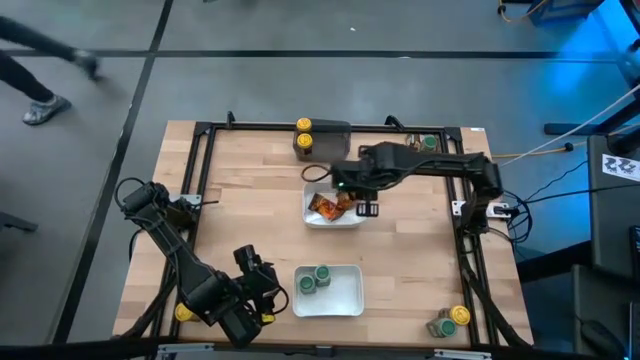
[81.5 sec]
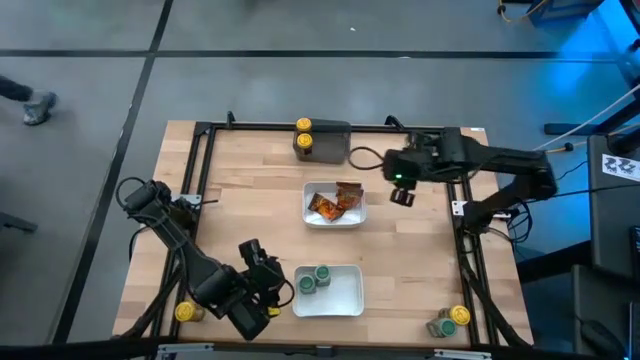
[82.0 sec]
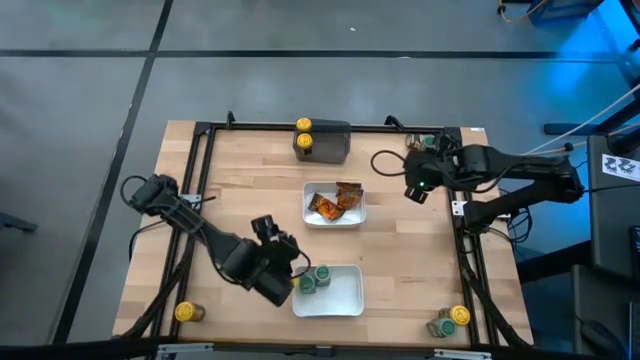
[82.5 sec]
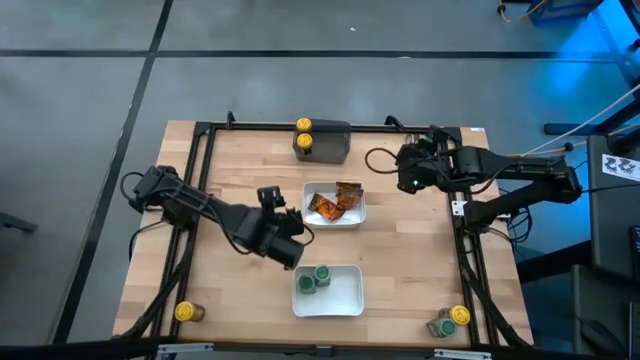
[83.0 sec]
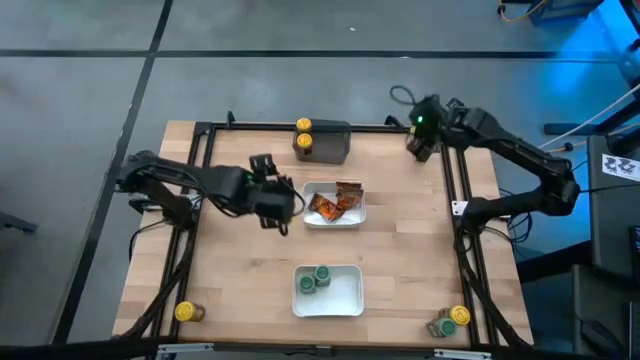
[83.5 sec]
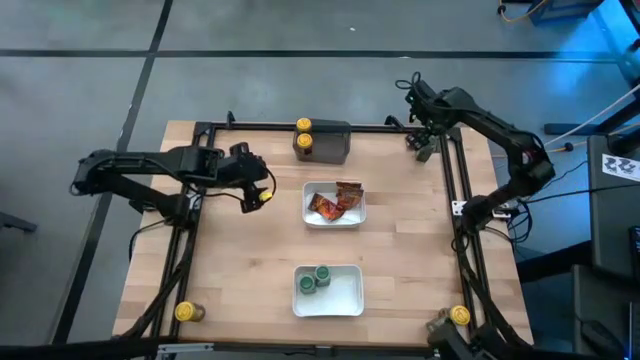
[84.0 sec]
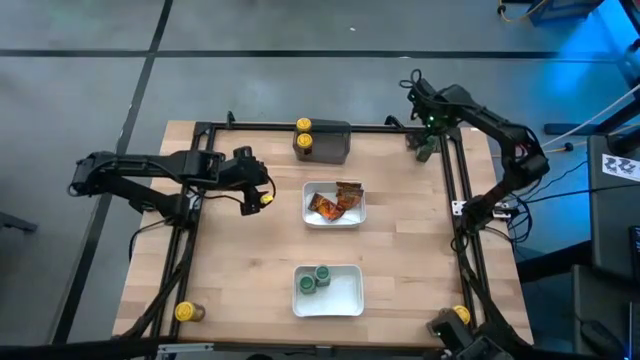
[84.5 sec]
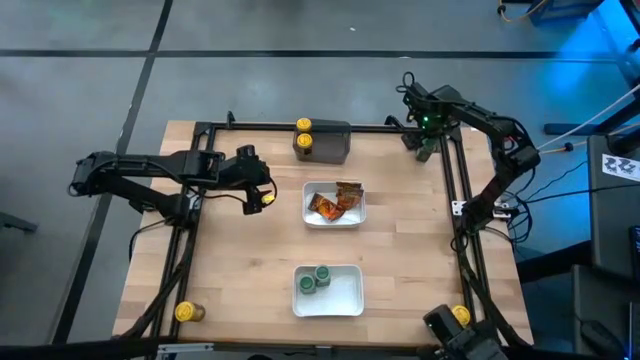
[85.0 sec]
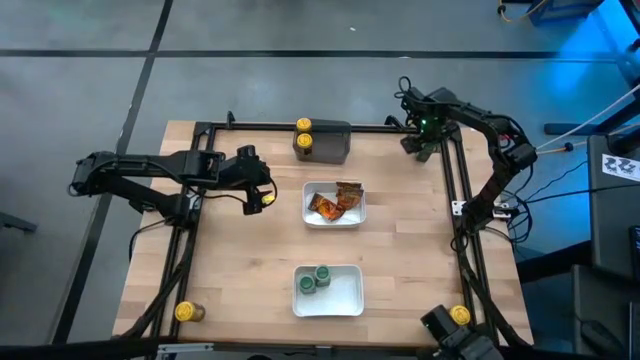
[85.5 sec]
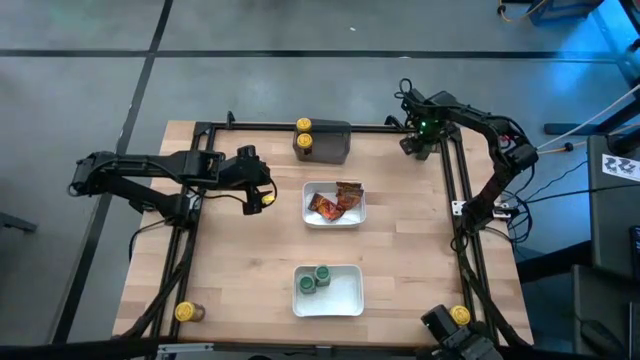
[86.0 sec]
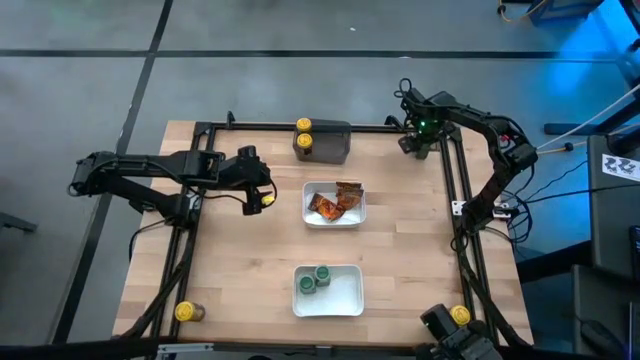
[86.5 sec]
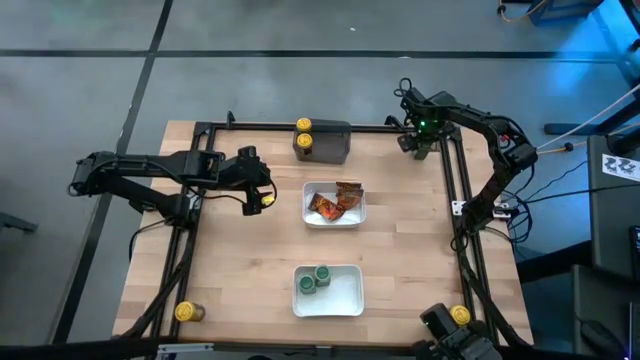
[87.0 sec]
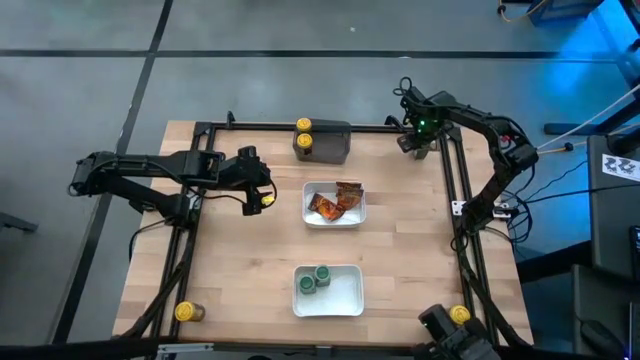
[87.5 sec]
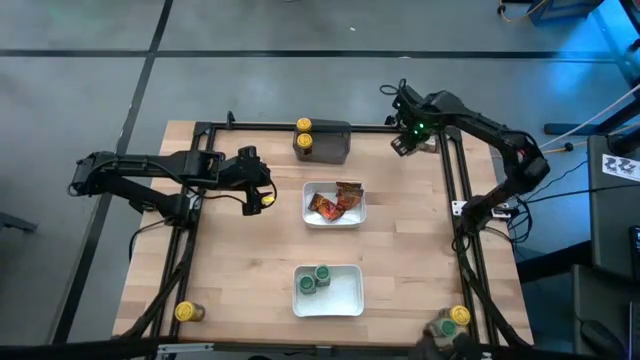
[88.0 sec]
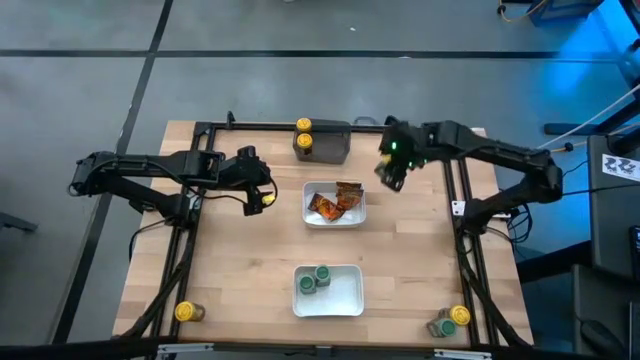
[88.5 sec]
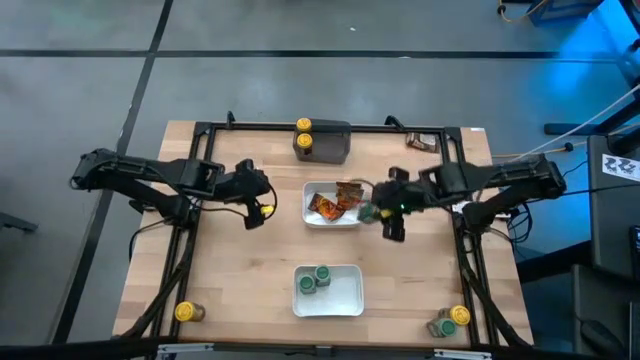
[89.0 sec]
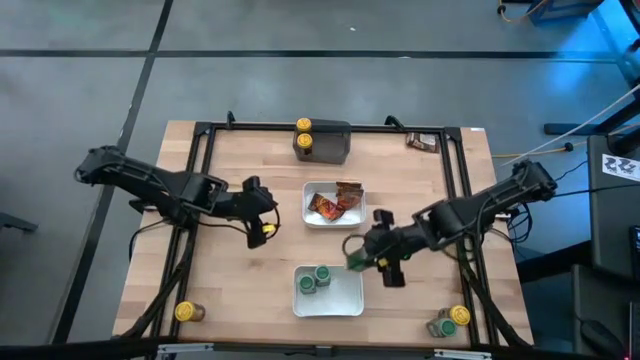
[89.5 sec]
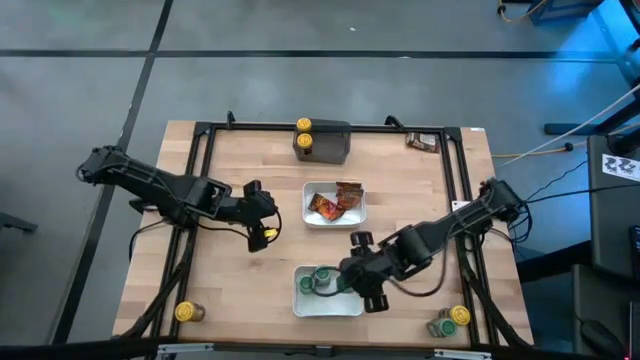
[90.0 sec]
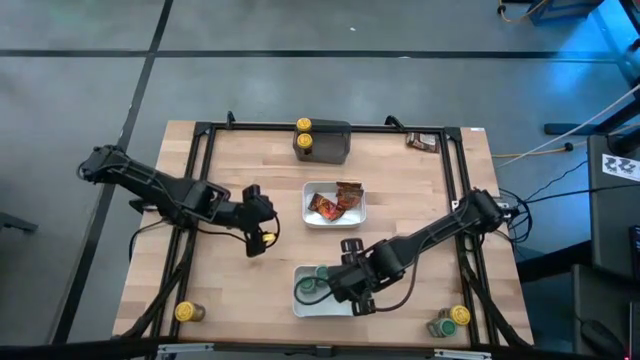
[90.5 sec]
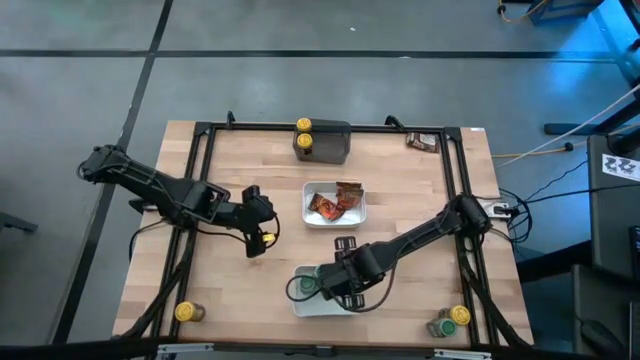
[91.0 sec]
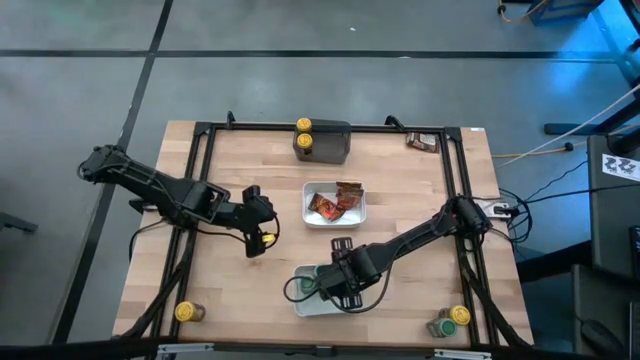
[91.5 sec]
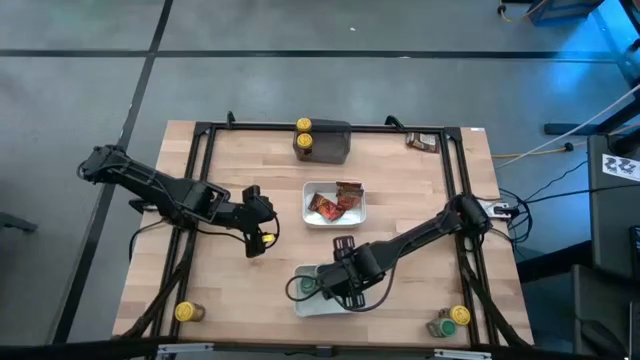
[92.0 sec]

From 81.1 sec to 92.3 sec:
Task: Sort spices by type
Put the green seasoning bottle into the bottom white bin

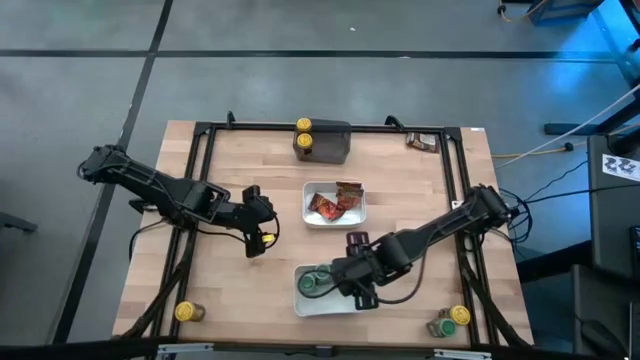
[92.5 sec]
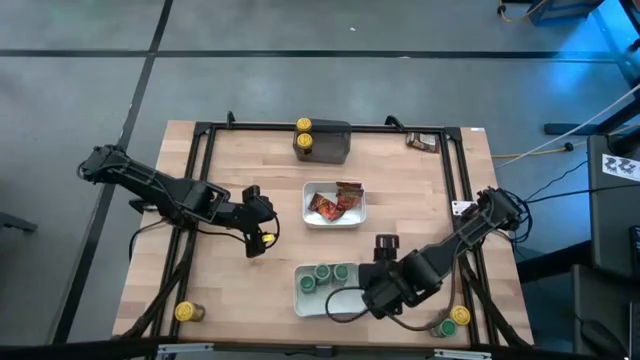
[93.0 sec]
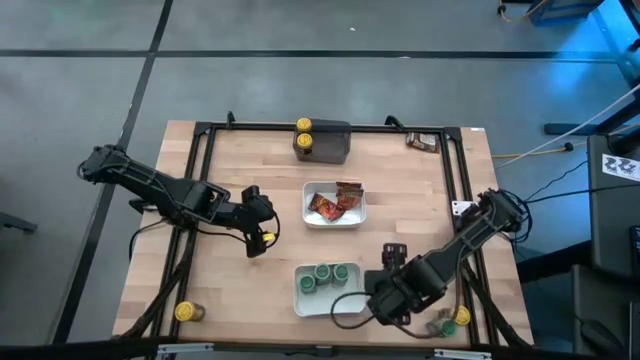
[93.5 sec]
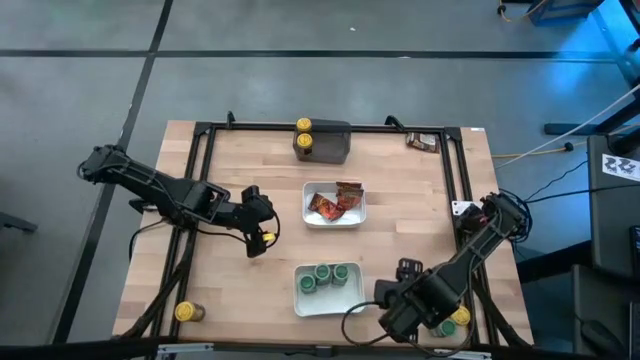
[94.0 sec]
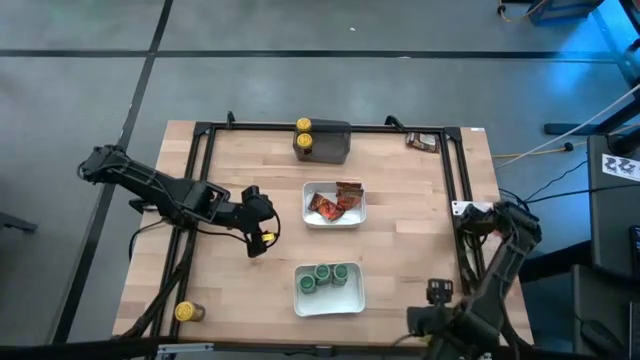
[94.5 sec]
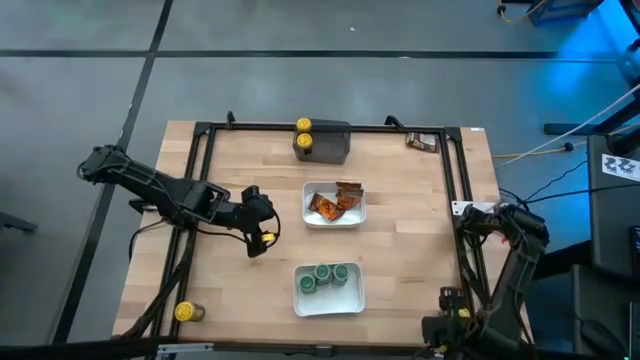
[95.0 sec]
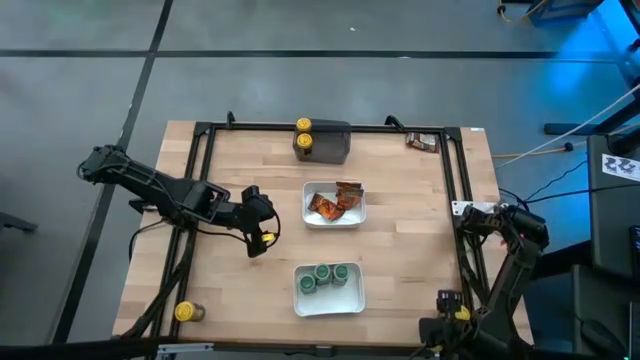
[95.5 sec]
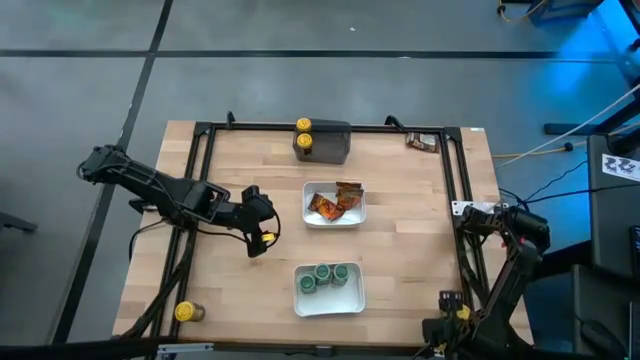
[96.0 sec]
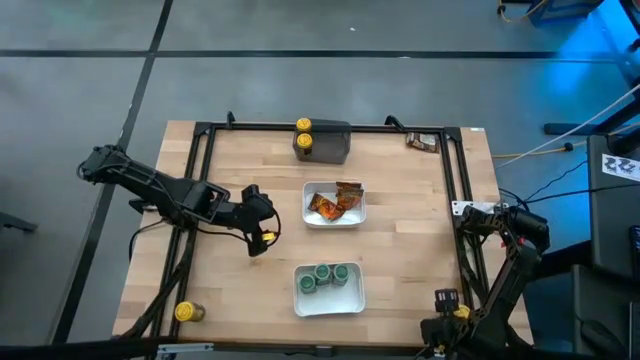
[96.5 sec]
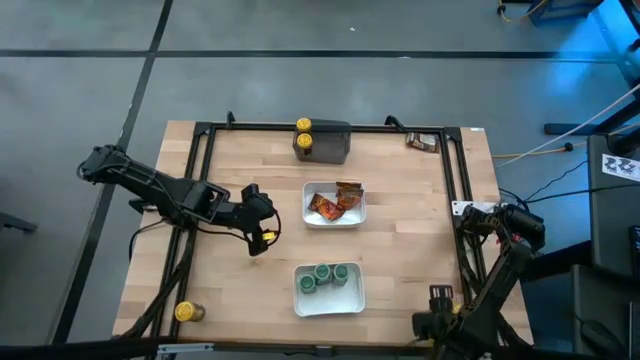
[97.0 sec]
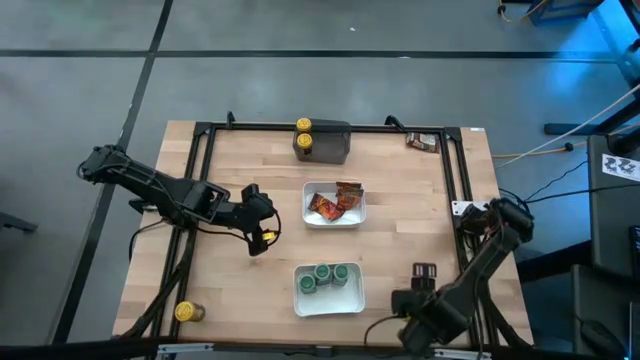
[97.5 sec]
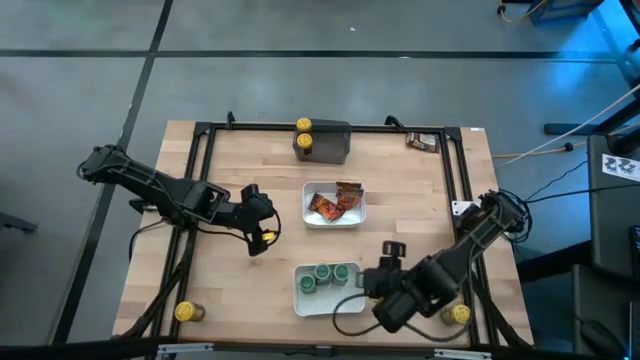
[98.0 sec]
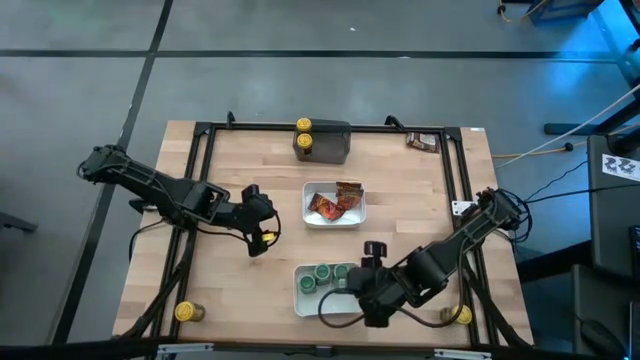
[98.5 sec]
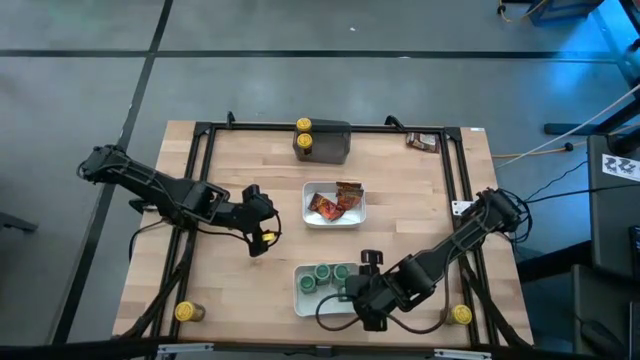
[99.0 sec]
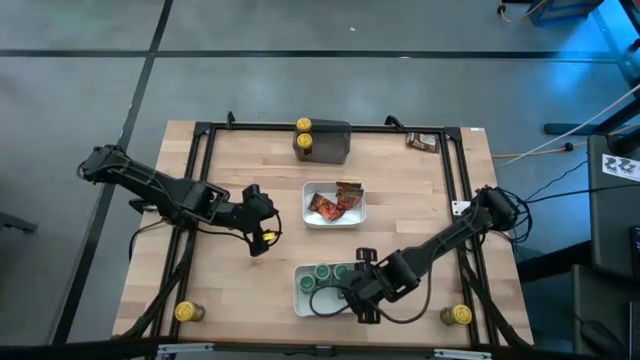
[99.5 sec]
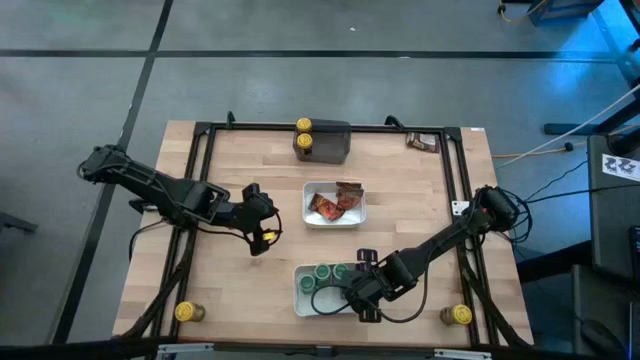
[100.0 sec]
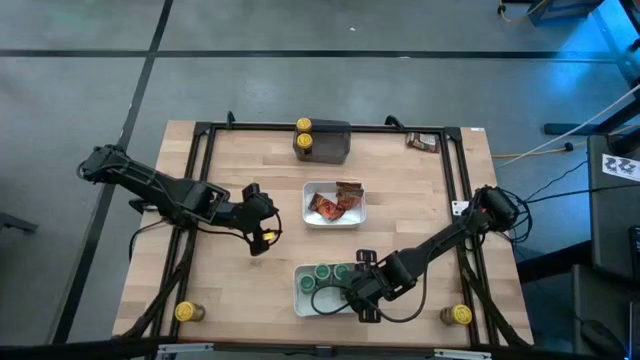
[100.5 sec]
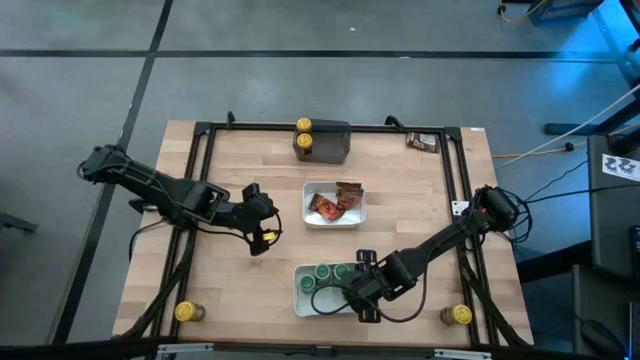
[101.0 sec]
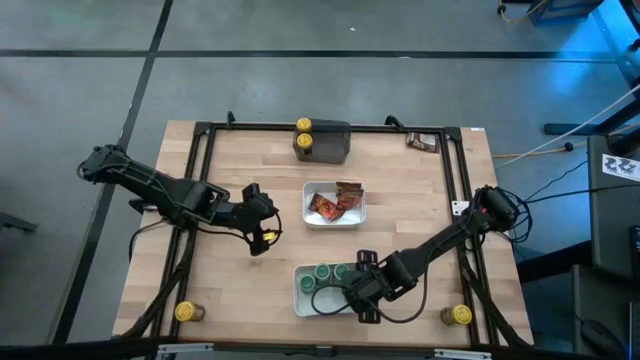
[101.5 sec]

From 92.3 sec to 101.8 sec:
Put the green seasoning bottle into the bottom white bin

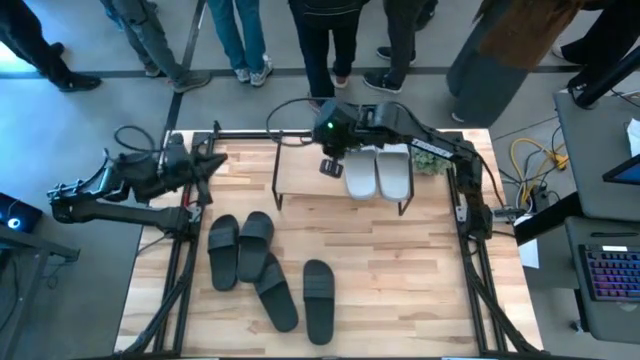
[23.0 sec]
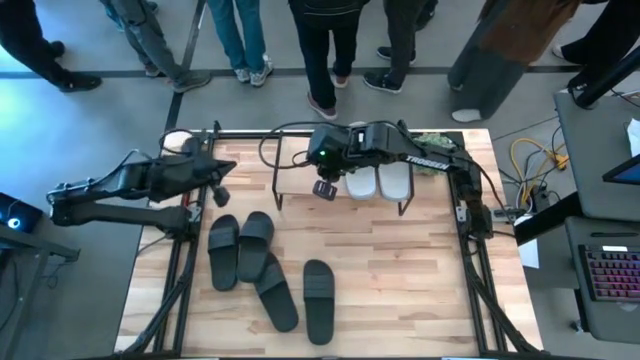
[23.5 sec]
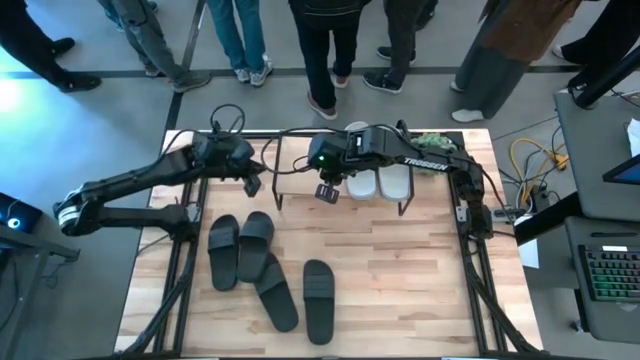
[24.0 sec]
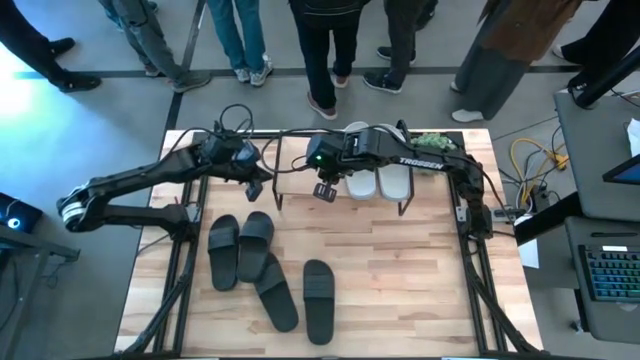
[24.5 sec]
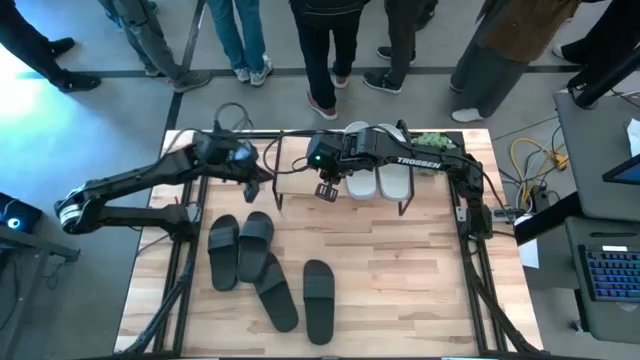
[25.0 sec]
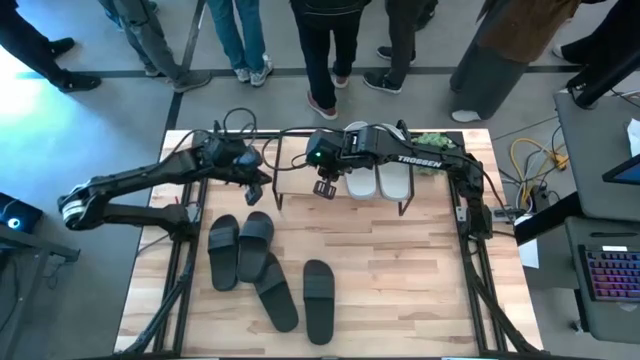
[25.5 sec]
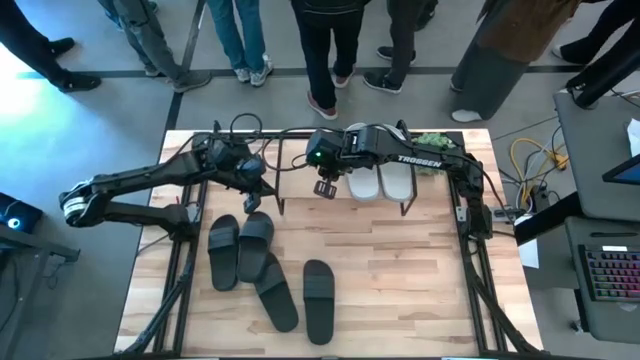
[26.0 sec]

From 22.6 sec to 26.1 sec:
Task: Pick and place slides into the shelf
Adjust the shelf
